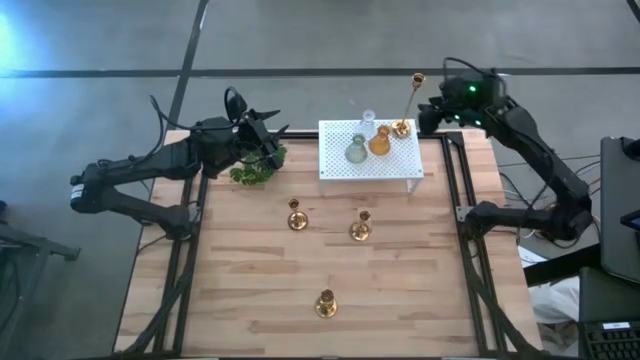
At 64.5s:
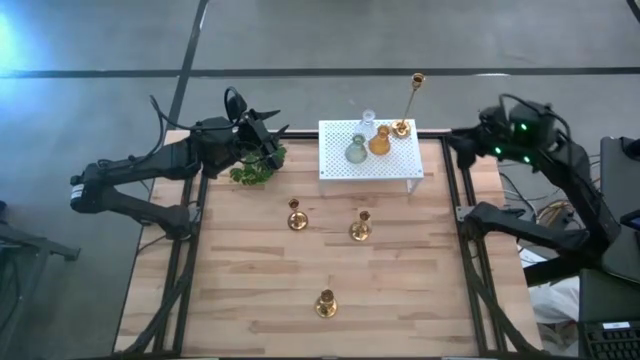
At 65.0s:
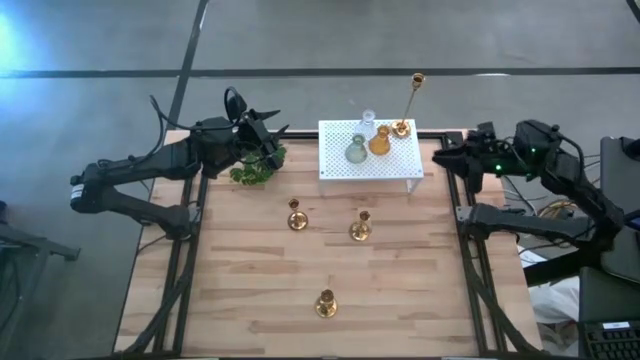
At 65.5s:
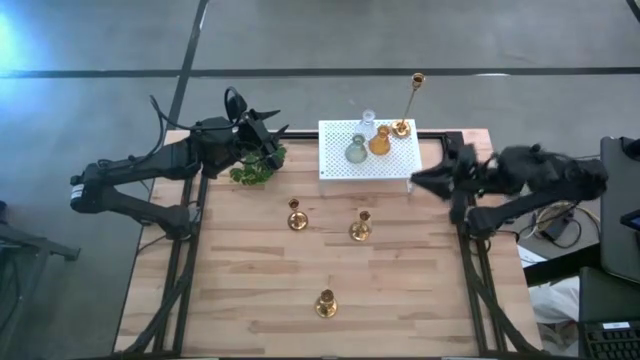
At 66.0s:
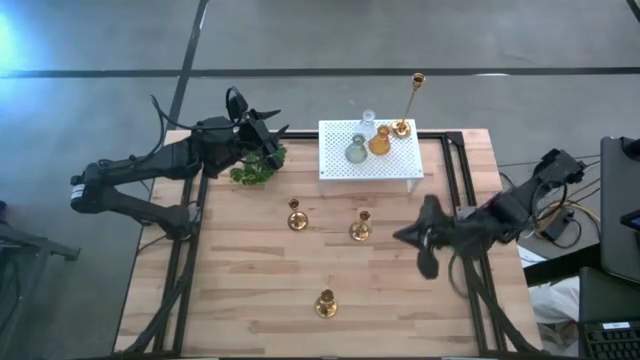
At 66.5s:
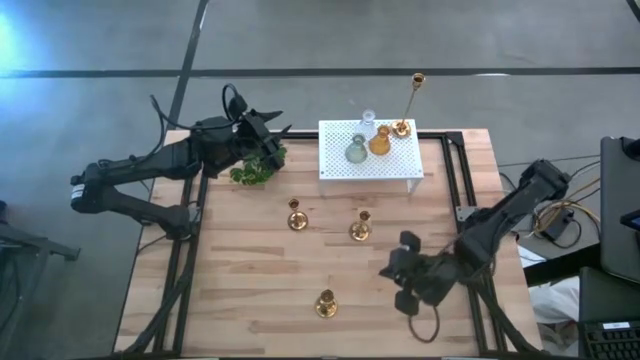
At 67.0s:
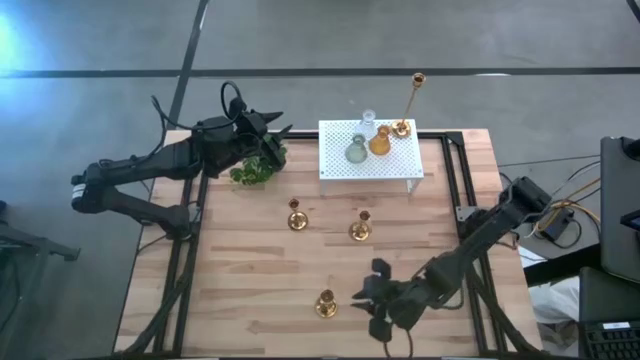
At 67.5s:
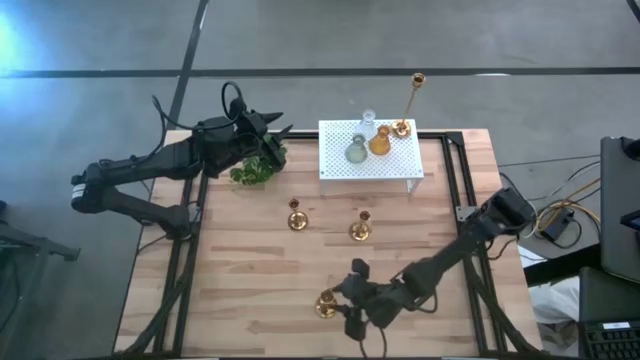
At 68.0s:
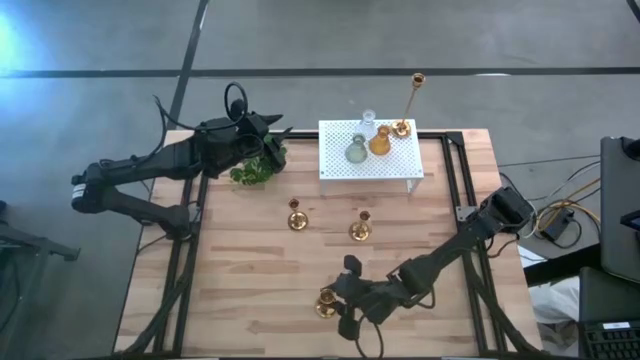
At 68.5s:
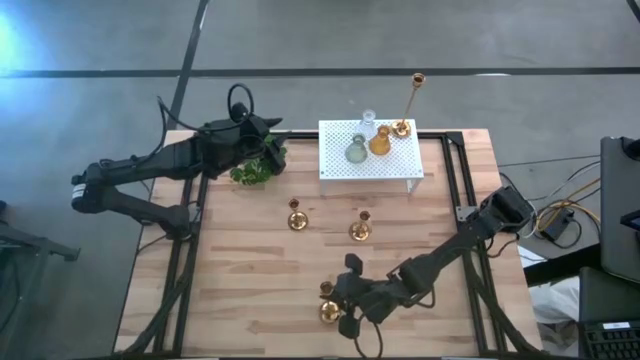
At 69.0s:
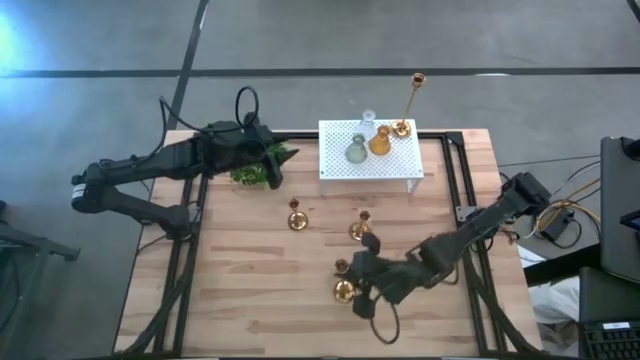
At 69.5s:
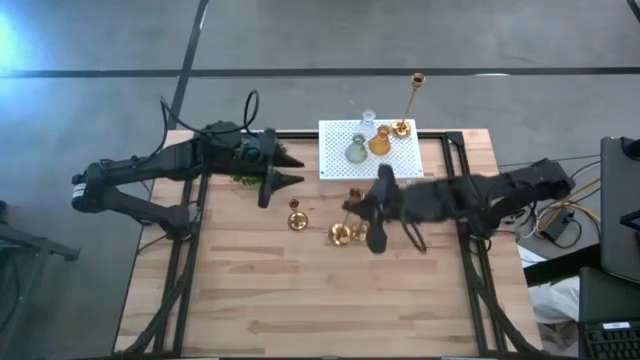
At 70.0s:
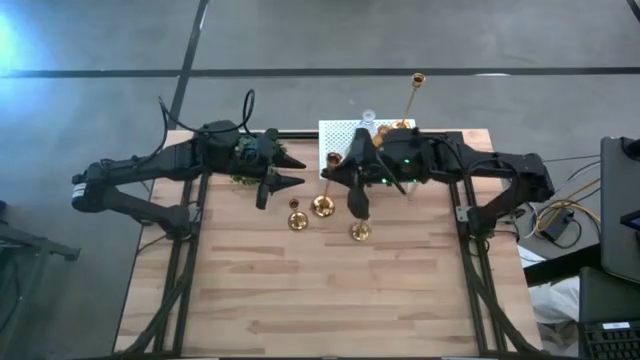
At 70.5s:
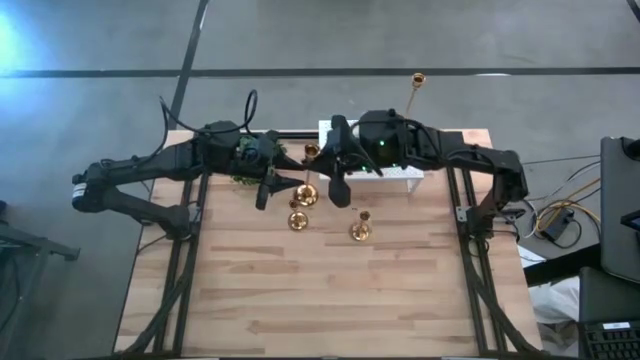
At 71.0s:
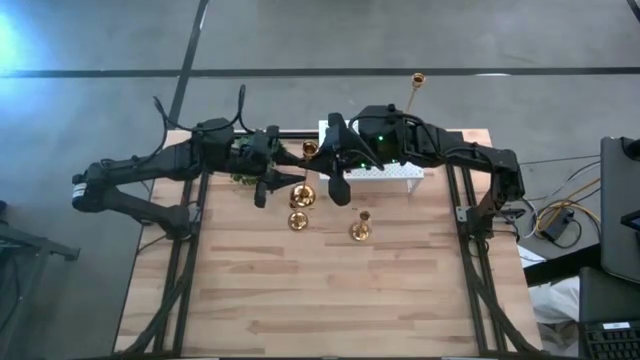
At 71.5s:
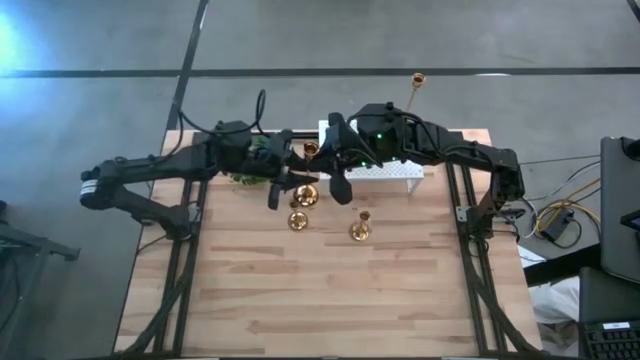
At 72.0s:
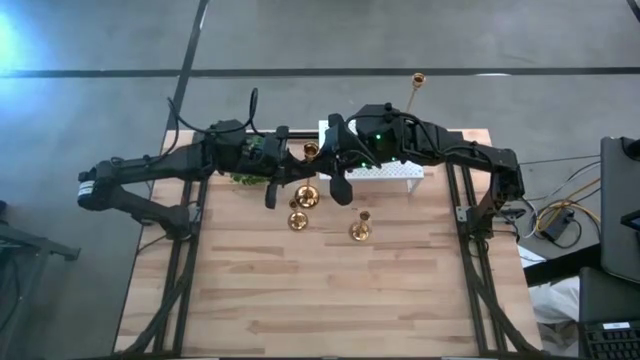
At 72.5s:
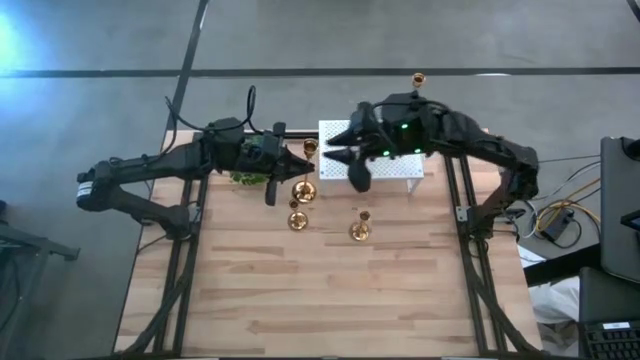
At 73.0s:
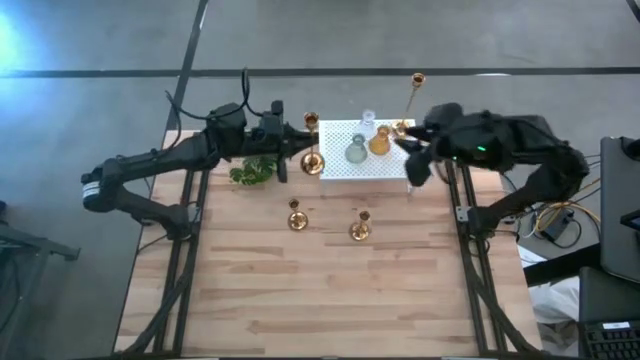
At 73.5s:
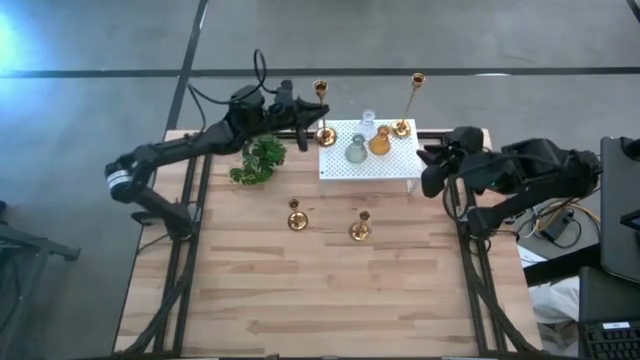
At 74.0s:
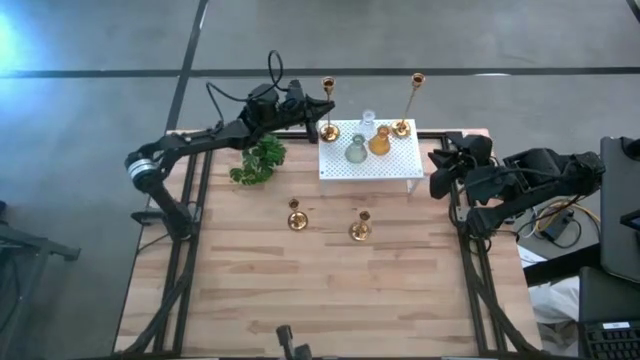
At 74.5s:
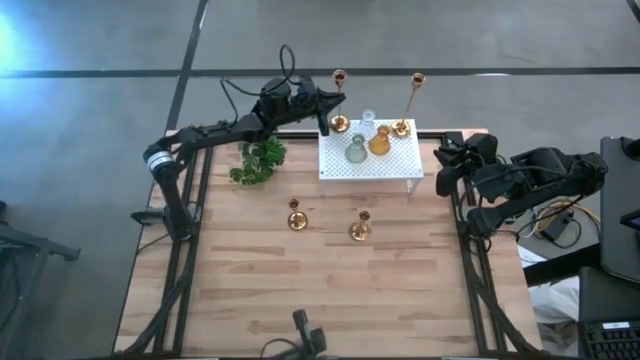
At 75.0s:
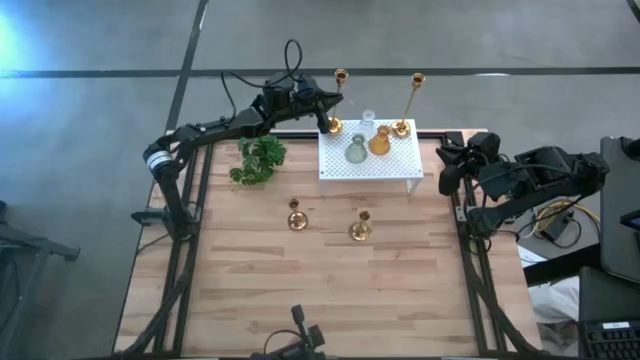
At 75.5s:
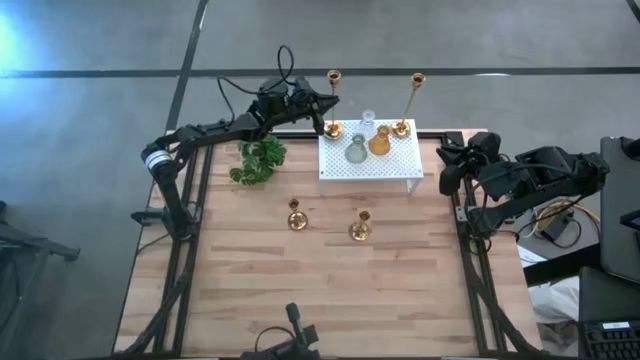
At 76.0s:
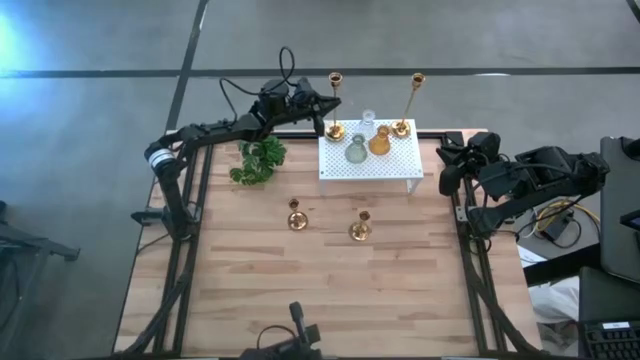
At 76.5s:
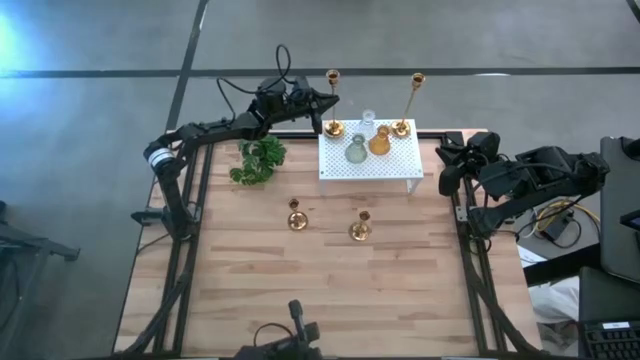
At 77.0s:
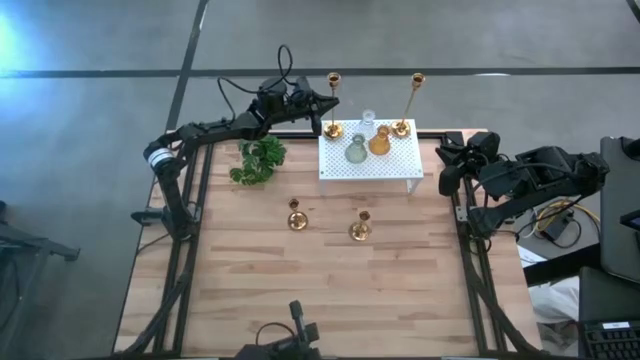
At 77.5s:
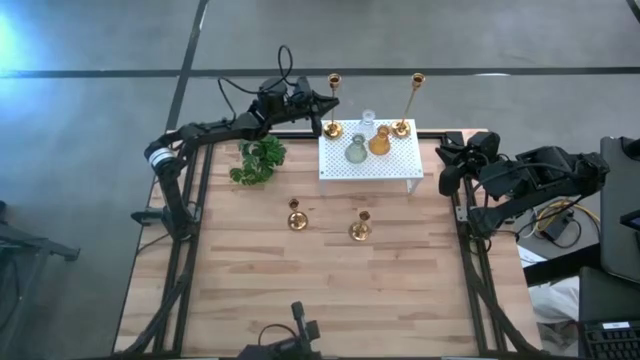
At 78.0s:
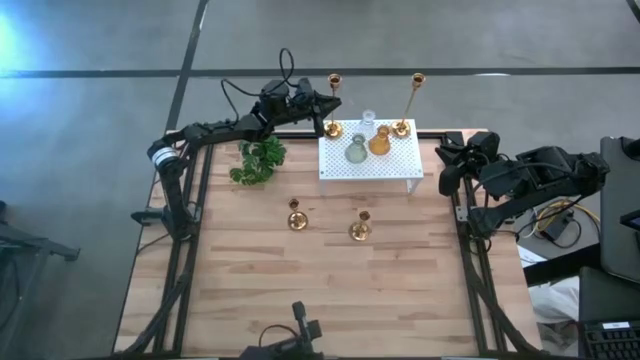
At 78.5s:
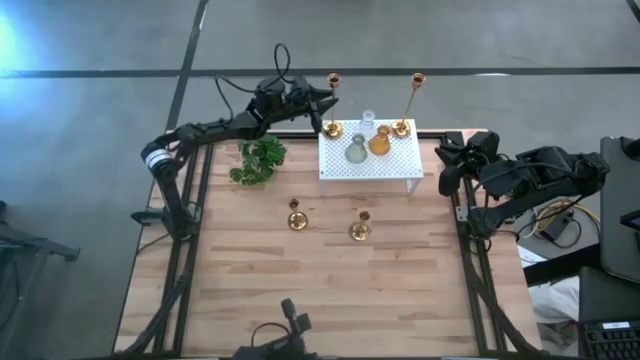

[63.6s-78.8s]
Task: Pick & Place candle stick holders
Put the golden candle holder on the shelf

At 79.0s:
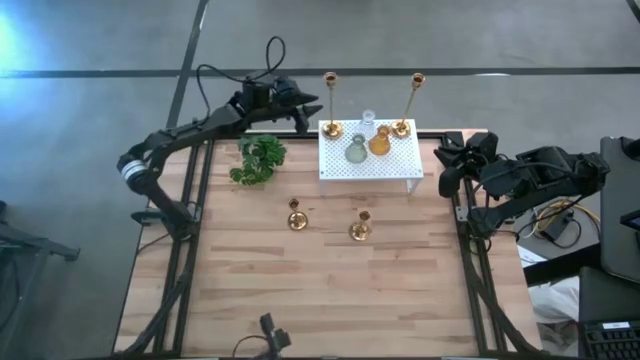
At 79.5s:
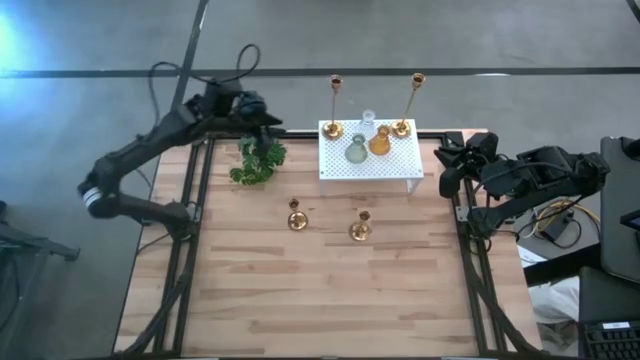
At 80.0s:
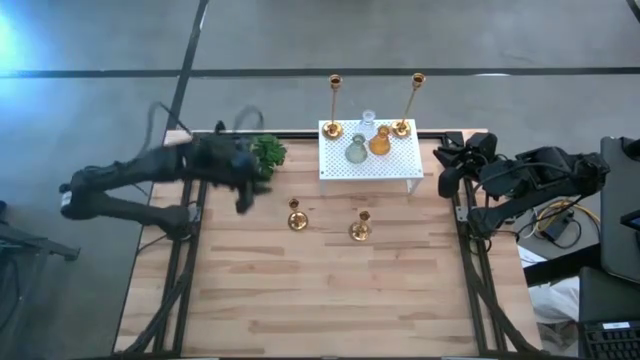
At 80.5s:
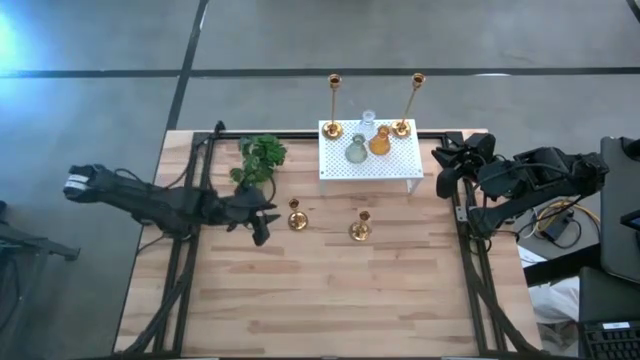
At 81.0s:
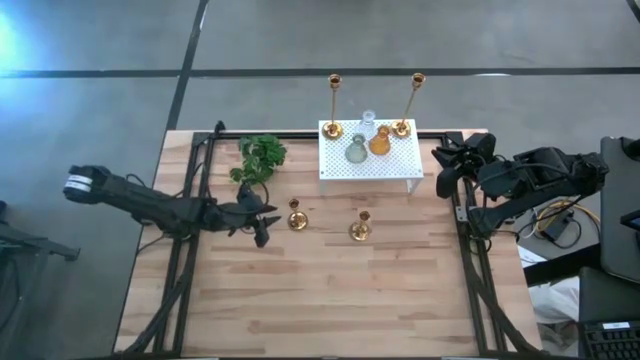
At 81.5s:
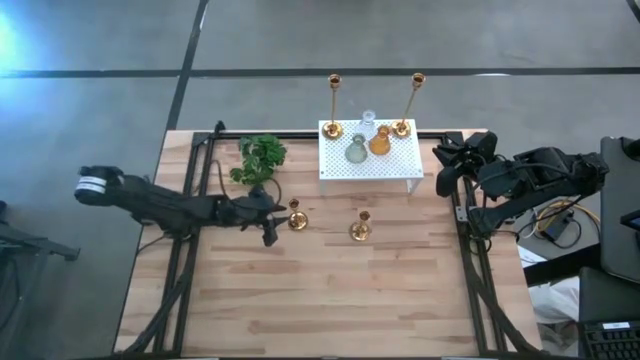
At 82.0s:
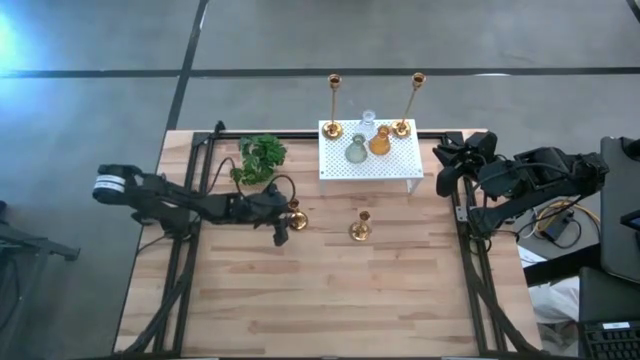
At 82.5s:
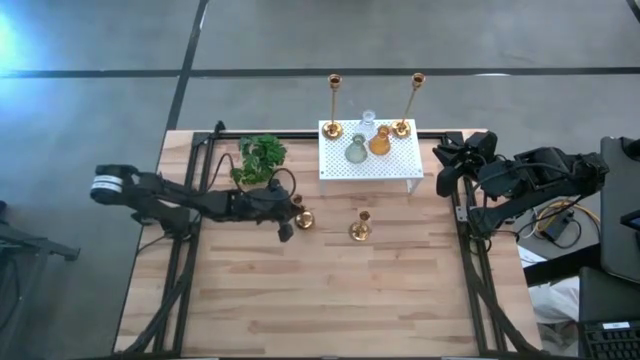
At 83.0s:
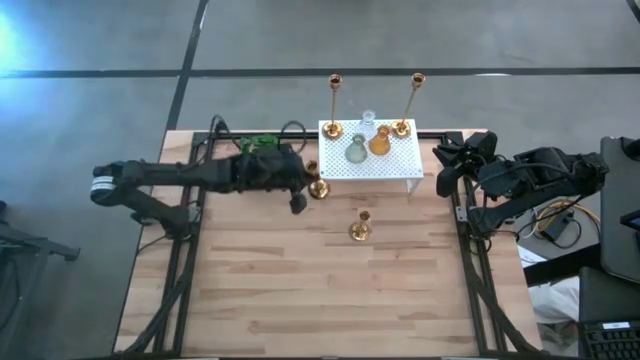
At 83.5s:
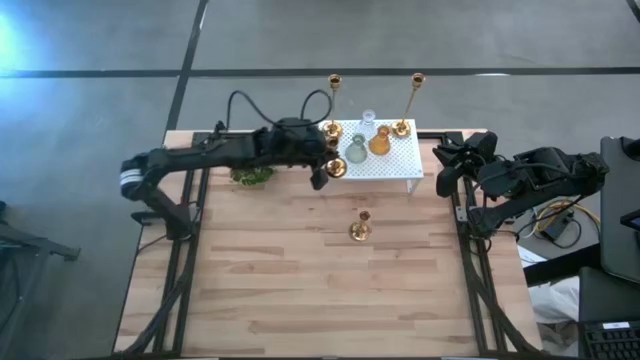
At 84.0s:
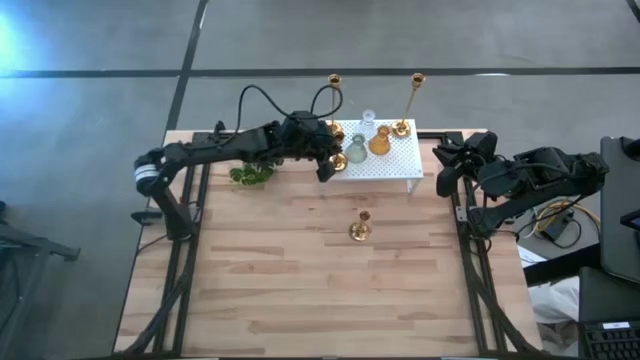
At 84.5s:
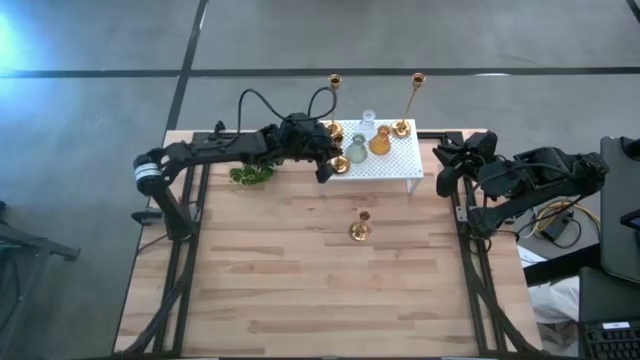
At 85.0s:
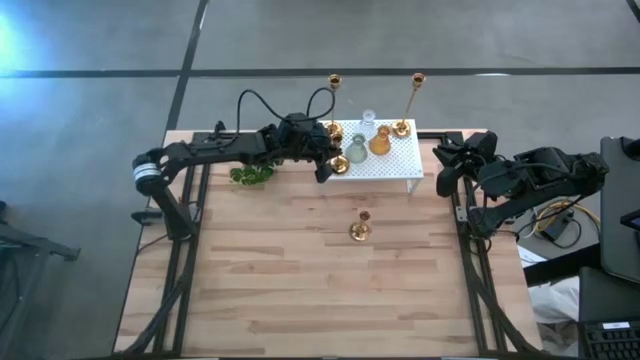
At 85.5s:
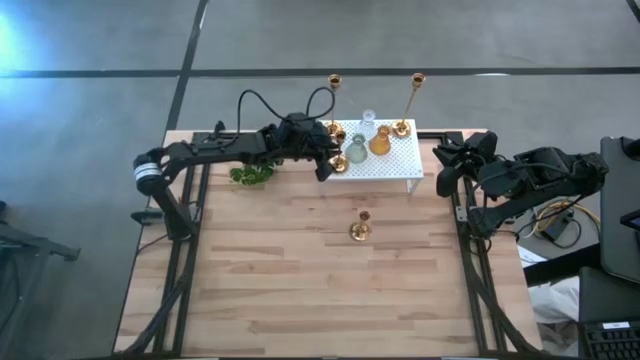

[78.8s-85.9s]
Align the golden candle holder with the golden candle holder on the shelf
